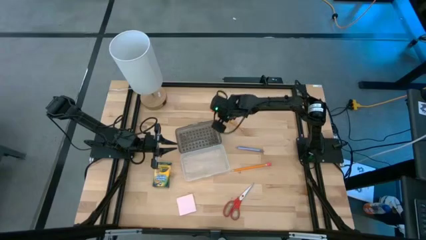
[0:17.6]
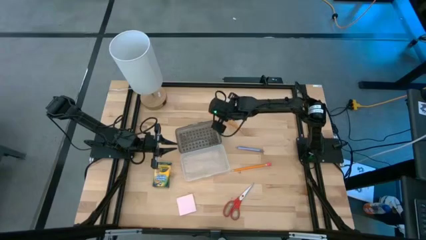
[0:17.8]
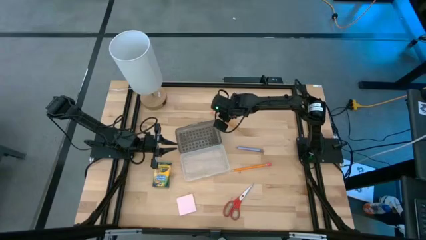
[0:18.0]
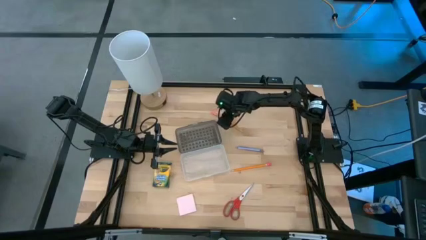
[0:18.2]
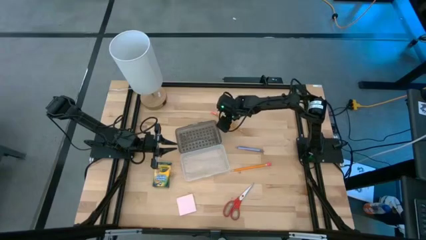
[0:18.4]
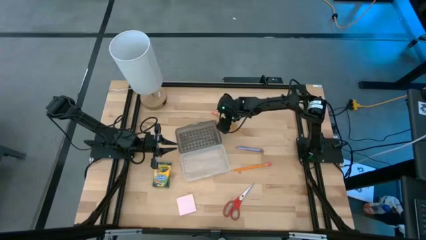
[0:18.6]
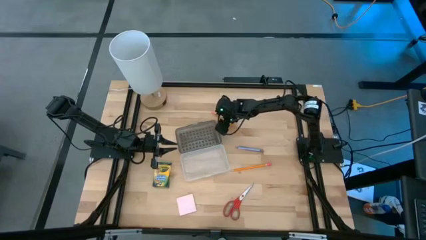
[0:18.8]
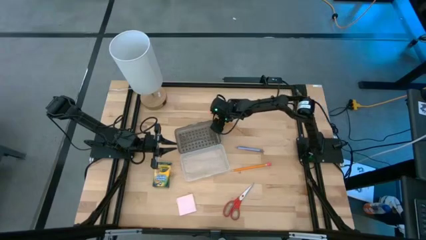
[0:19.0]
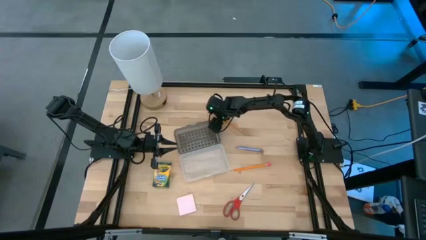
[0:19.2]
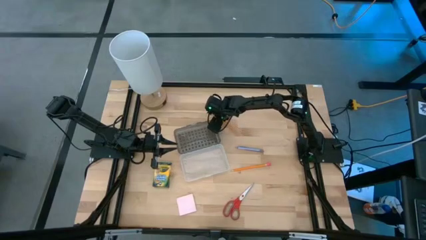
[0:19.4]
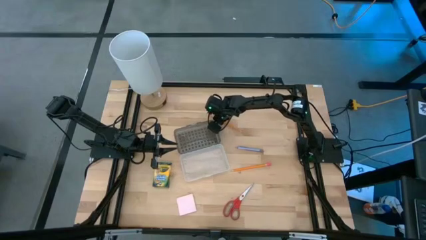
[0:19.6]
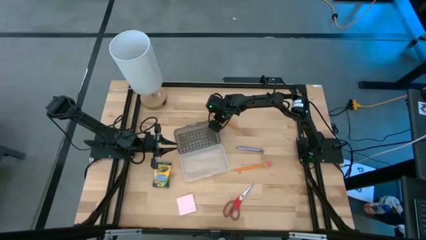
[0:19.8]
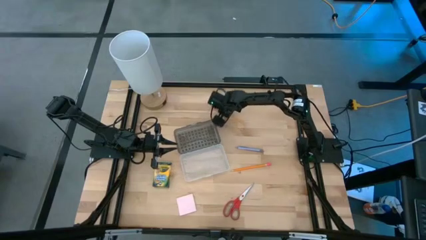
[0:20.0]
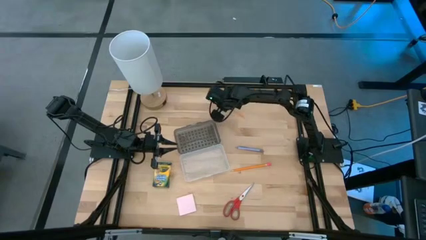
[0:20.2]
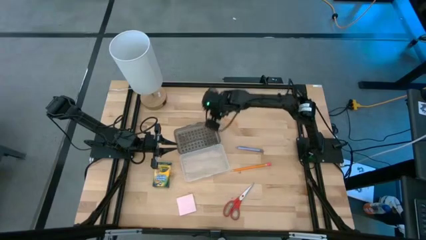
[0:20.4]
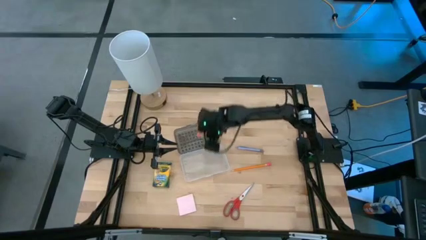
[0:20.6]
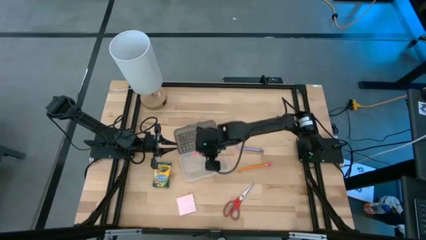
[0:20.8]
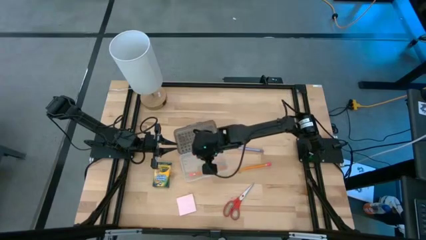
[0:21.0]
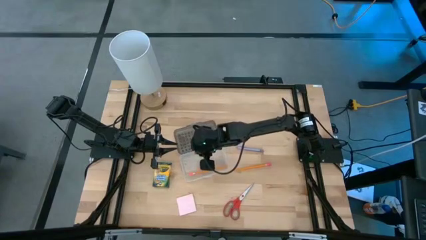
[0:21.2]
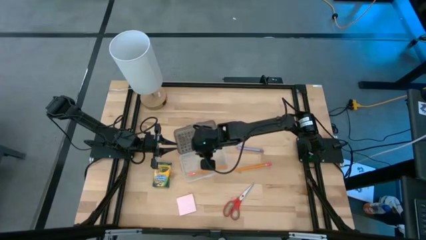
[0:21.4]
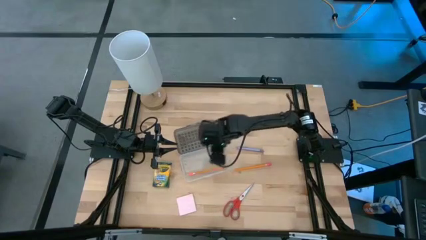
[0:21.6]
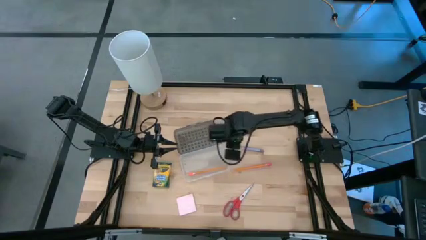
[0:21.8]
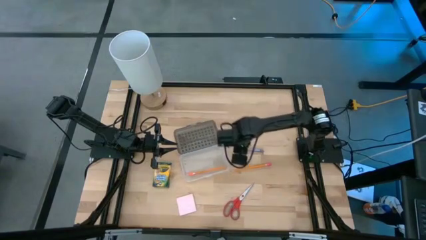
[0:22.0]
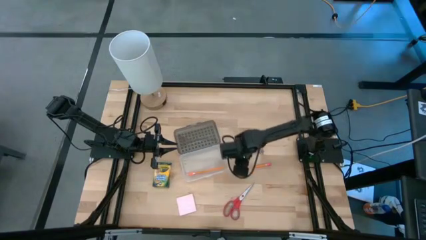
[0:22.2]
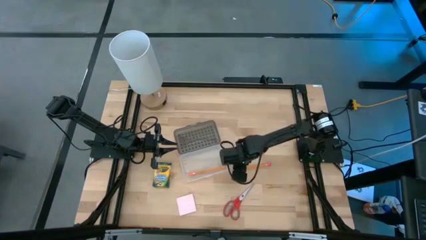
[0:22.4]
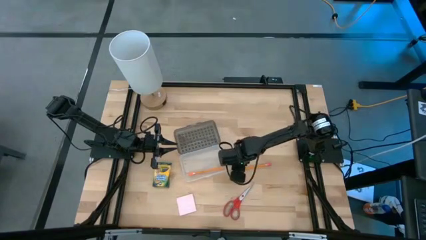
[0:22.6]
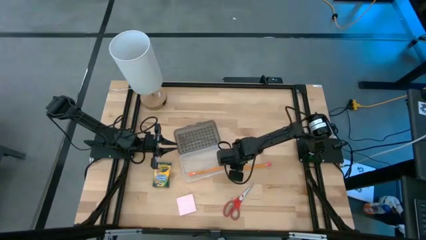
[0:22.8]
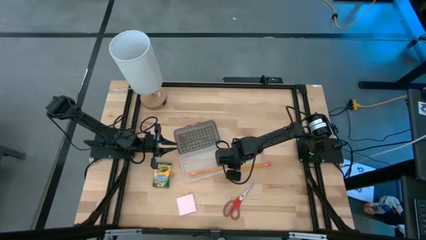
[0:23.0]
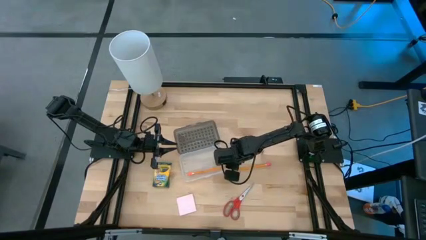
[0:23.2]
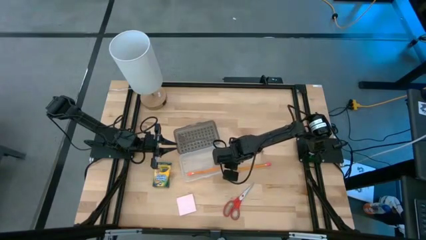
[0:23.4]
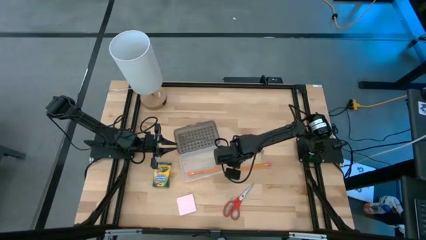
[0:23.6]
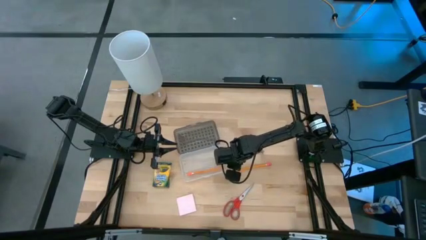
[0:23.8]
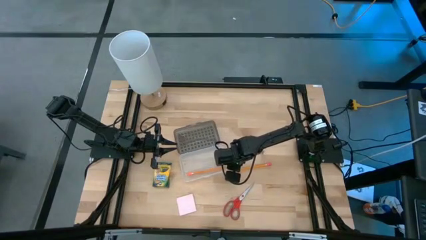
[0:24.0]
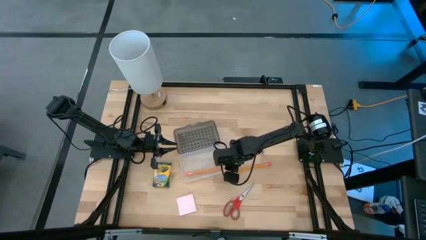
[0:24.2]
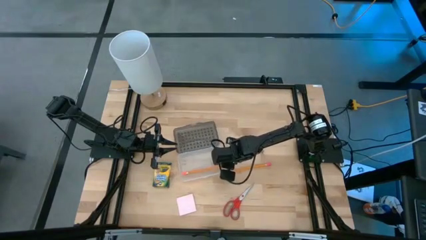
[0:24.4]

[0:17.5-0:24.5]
Task: Pack school essentials
Put the top orange pencil into the gray supply box

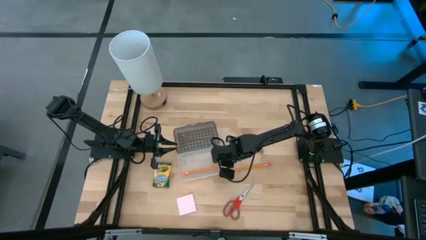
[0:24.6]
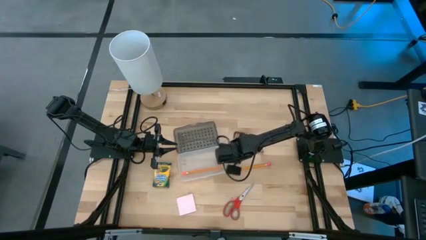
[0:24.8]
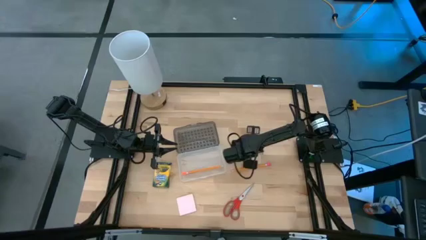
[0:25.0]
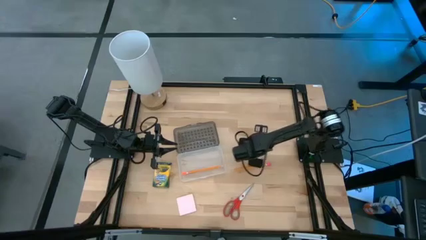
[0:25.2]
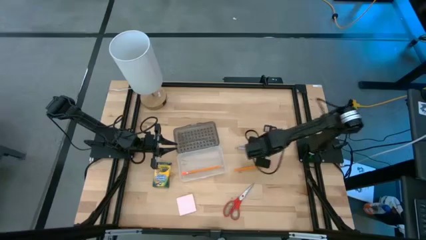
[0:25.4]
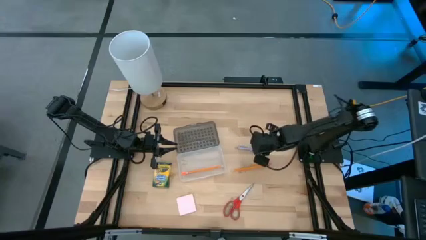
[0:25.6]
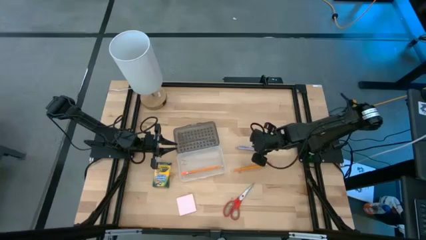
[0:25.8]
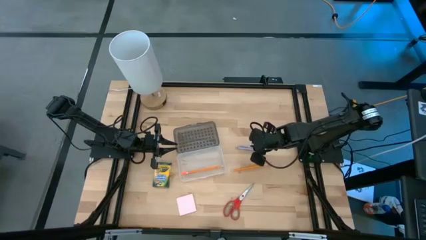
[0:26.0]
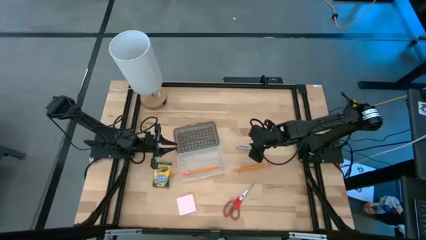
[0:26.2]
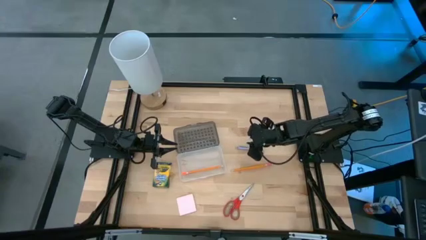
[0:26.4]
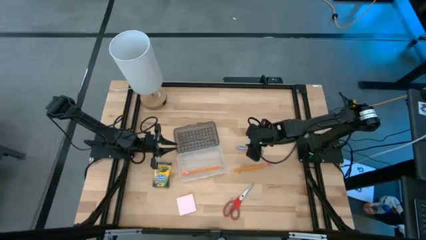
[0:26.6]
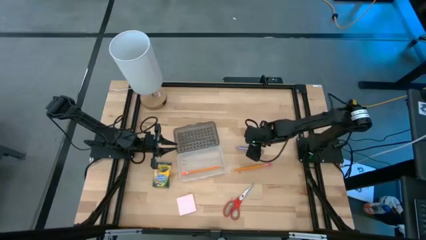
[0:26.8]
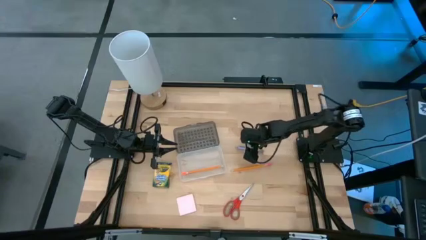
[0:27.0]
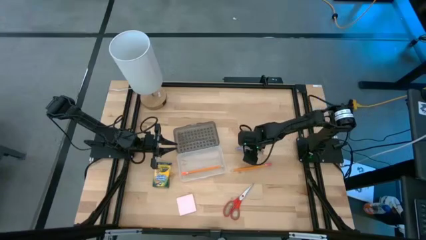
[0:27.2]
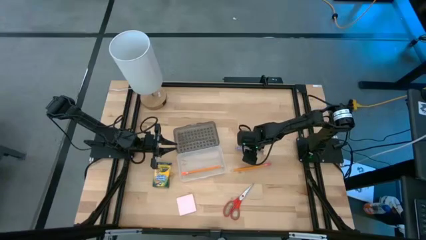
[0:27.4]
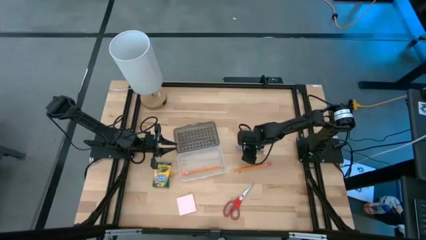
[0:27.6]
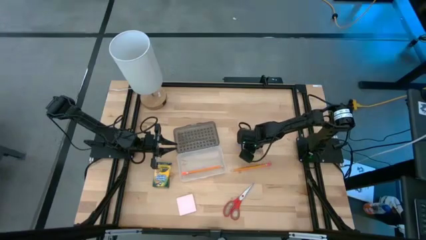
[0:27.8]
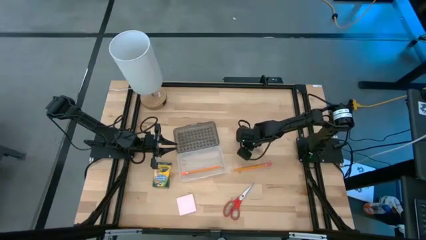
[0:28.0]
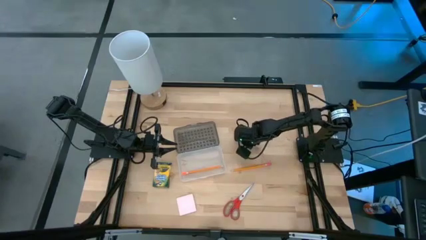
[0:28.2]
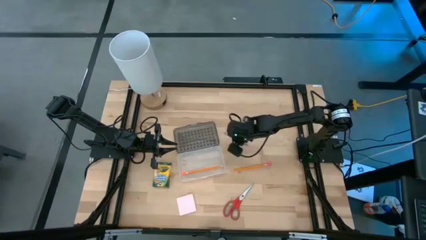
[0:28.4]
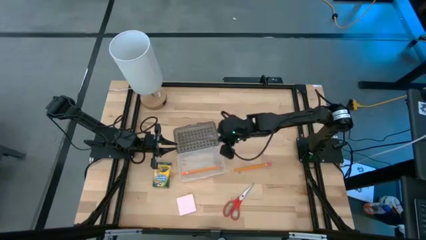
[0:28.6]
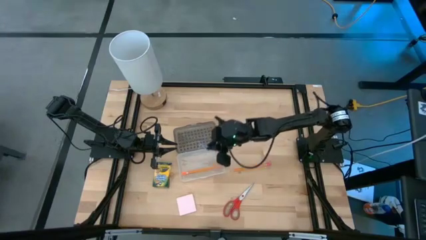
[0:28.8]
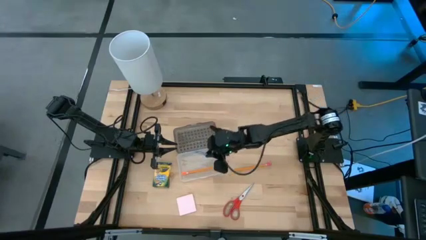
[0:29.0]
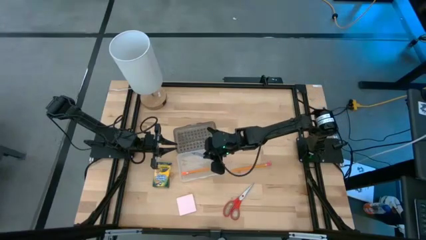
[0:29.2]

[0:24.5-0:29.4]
Put the light purple pen into the gray supply box

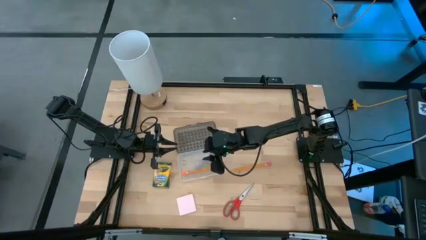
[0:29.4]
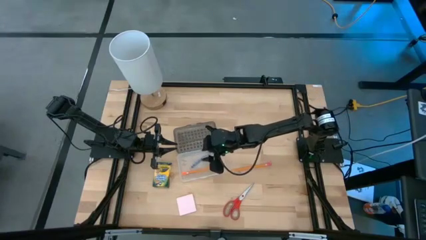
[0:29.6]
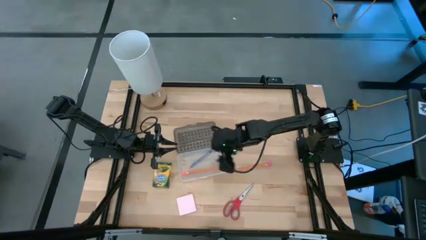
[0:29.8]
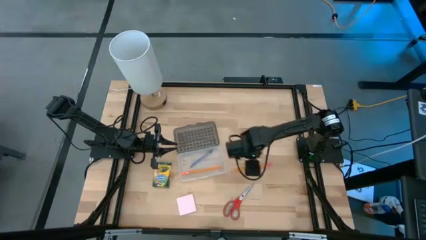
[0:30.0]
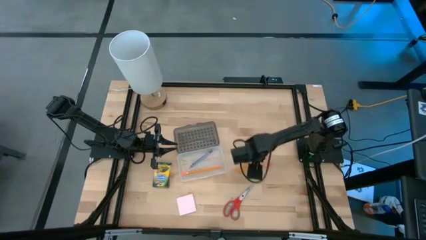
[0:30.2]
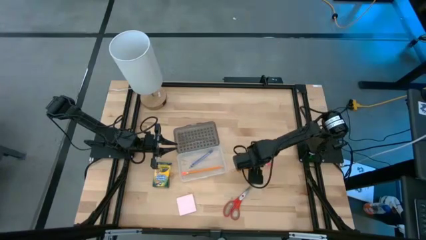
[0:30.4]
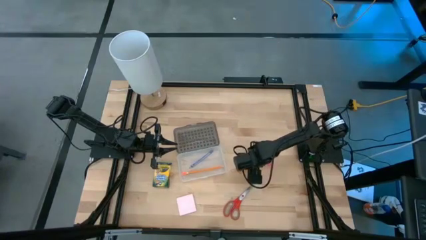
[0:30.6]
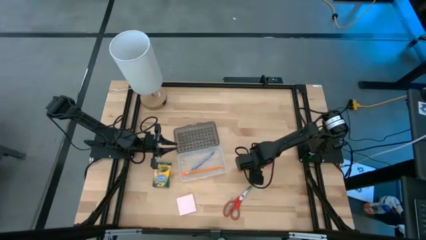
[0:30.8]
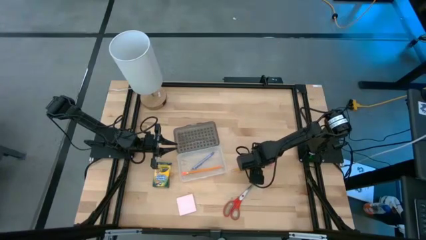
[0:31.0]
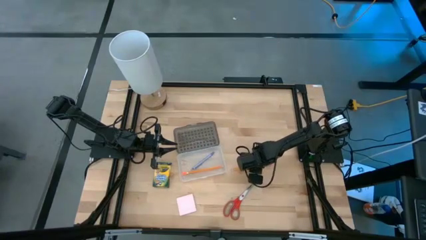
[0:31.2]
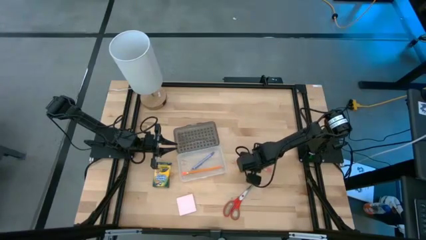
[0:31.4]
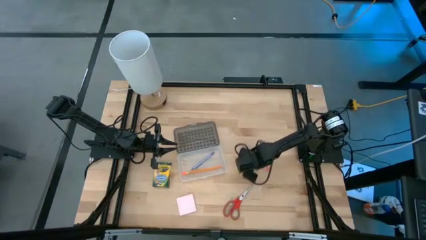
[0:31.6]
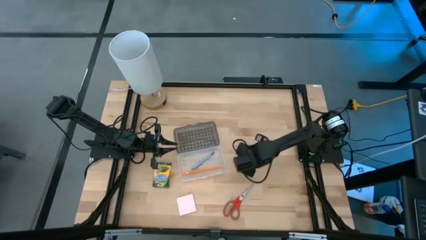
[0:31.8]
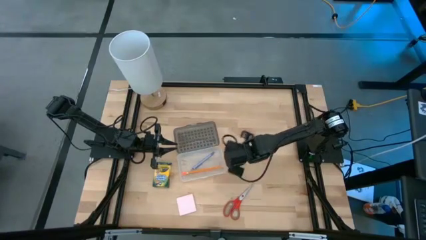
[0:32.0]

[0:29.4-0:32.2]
Put the orange pencil into the gray supply box
